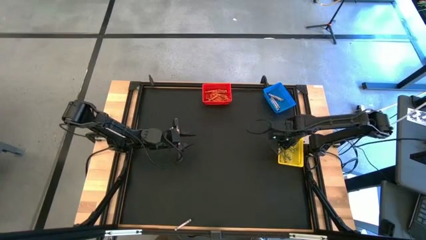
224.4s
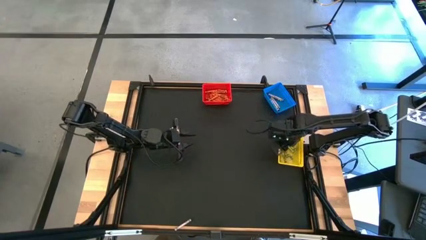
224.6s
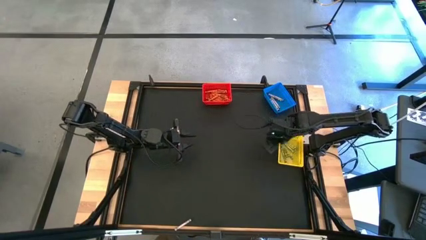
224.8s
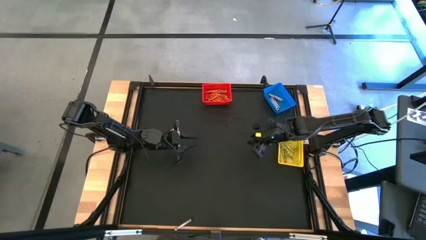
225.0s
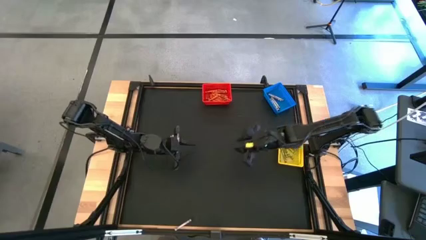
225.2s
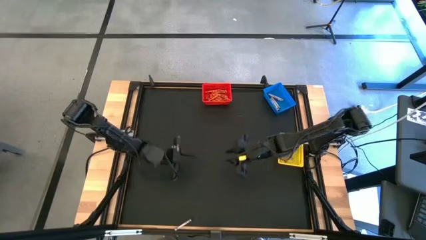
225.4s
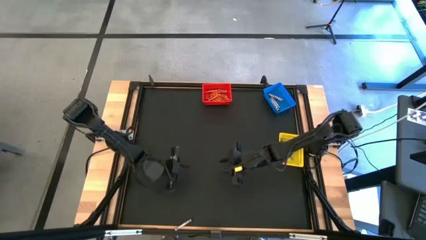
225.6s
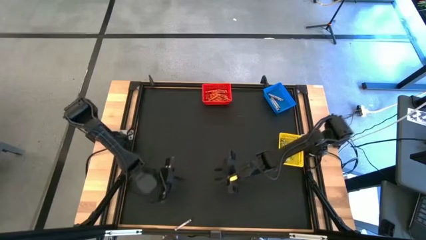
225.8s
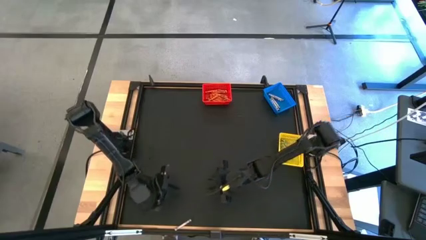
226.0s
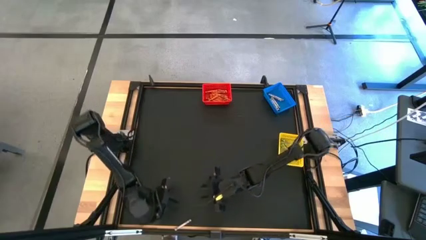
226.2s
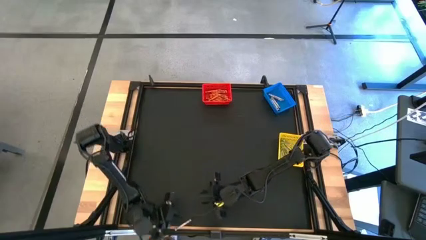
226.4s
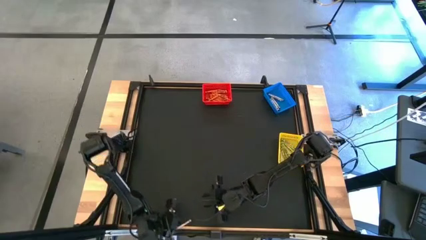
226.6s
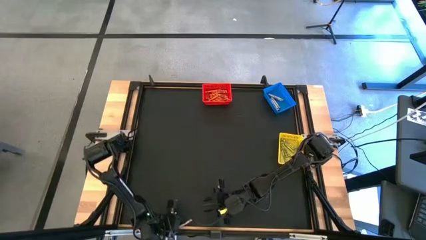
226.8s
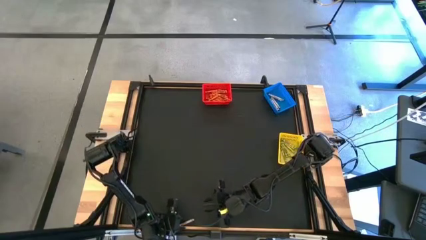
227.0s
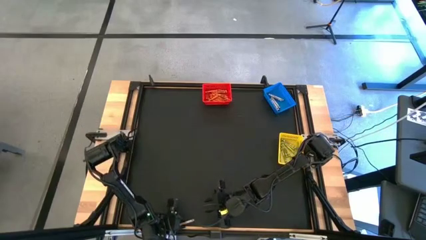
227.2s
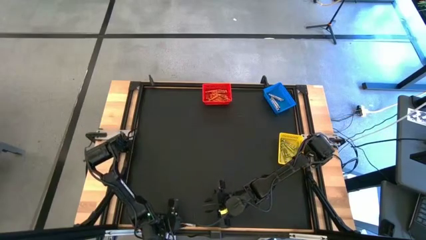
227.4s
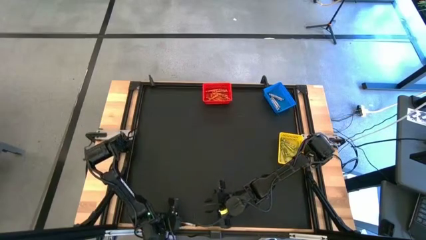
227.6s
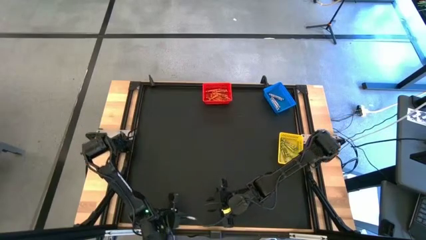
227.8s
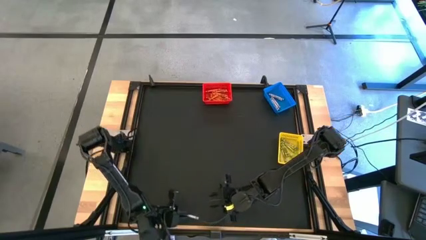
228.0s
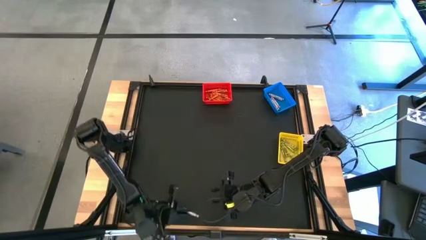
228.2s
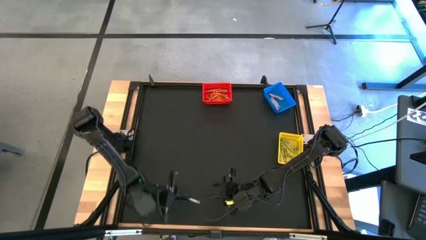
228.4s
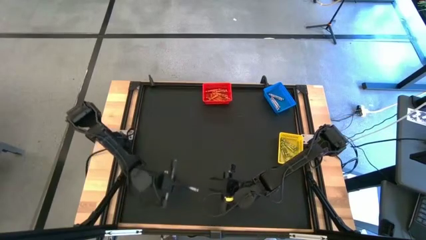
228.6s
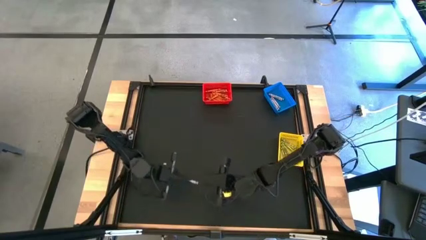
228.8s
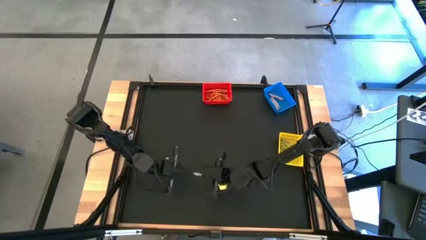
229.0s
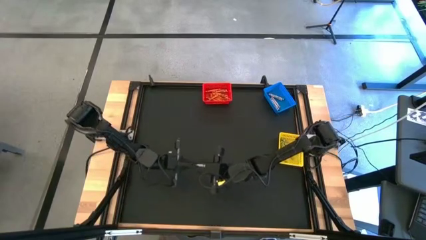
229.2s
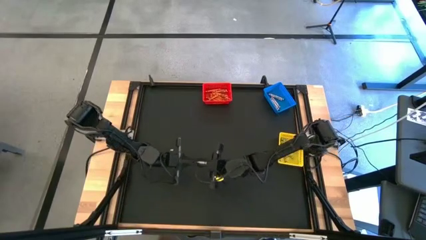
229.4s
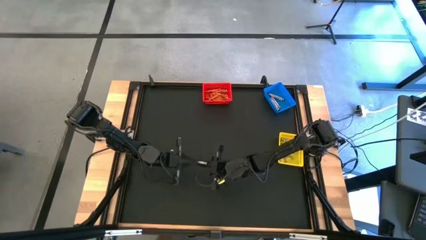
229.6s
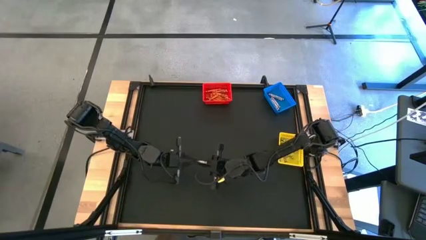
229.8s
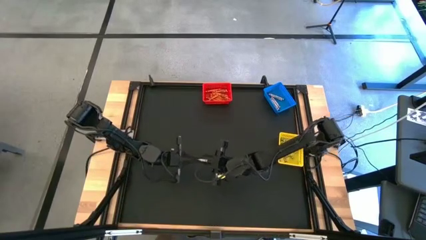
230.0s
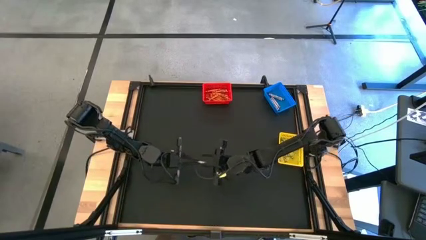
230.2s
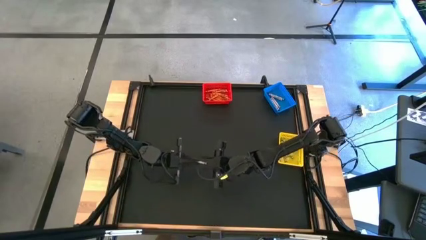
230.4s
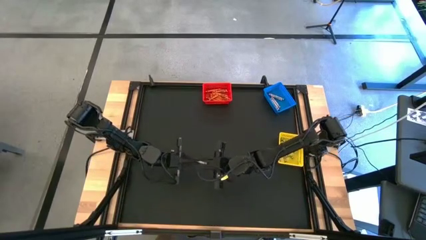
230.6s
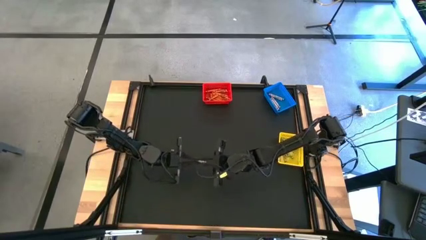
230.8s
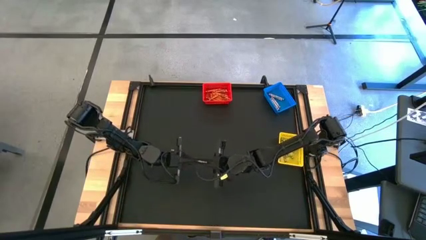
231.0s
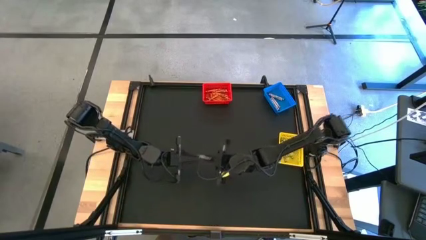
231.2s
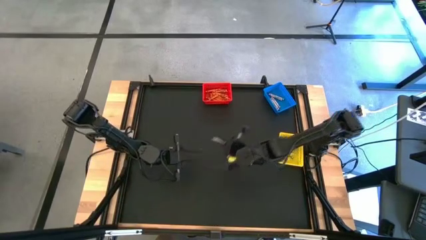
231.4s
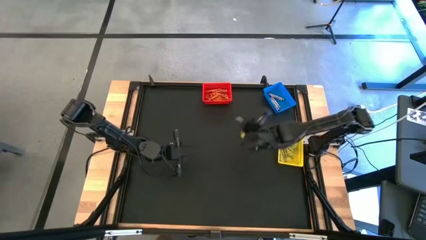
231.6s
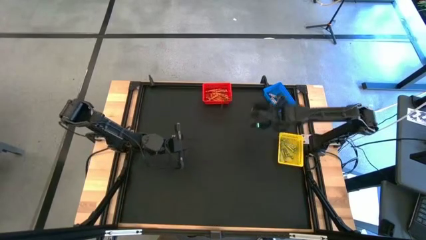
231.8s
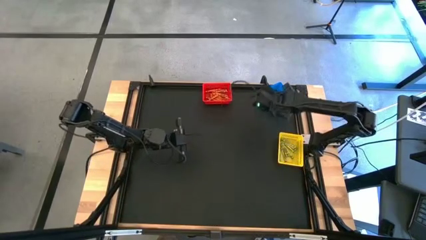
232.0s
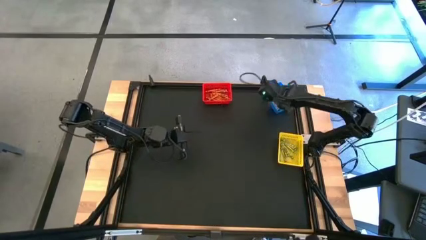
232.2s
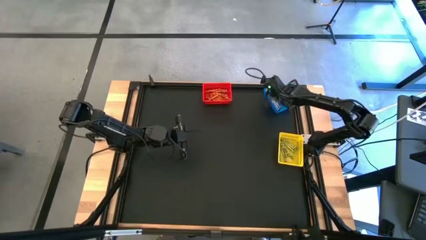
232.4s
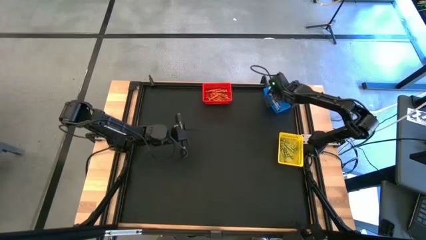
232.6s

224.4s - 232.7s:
Task: Sort crayons
Put the black crayon into the blue bin

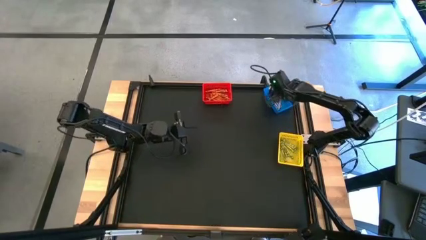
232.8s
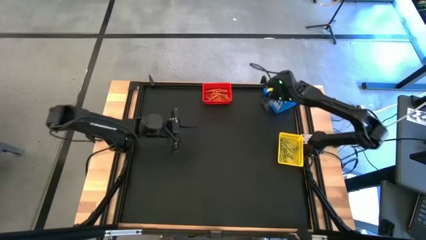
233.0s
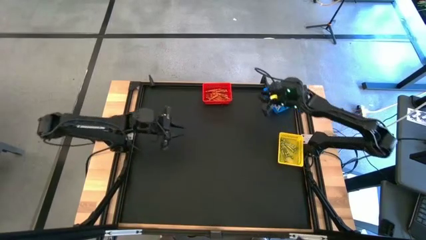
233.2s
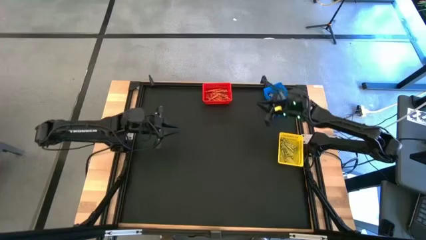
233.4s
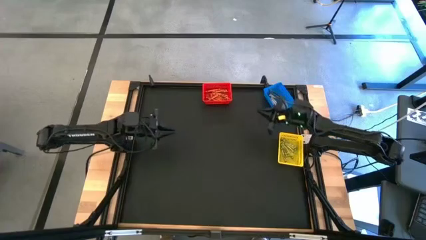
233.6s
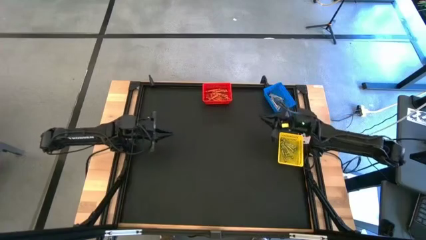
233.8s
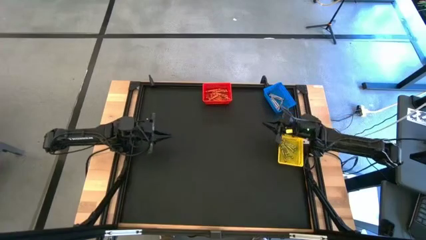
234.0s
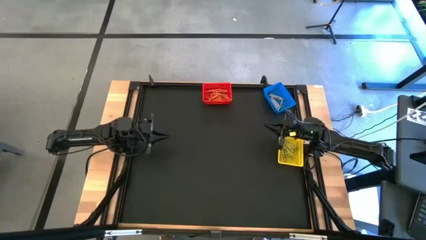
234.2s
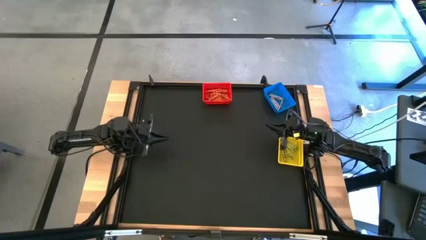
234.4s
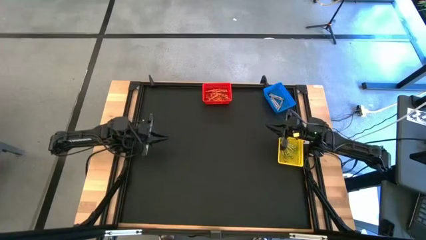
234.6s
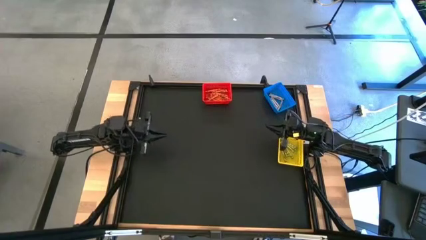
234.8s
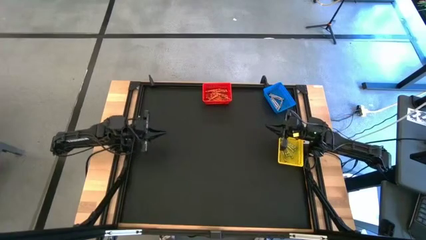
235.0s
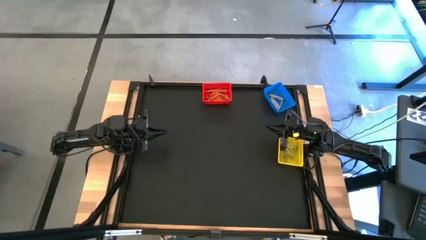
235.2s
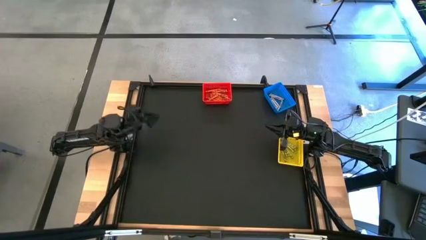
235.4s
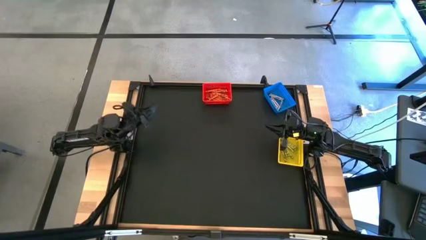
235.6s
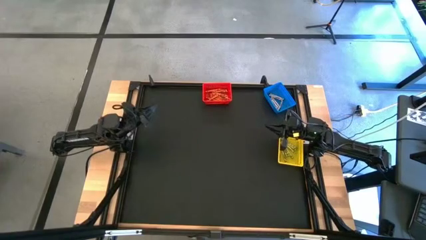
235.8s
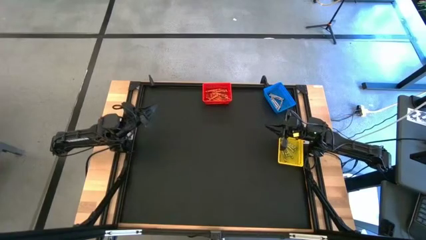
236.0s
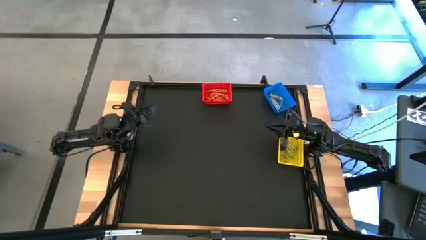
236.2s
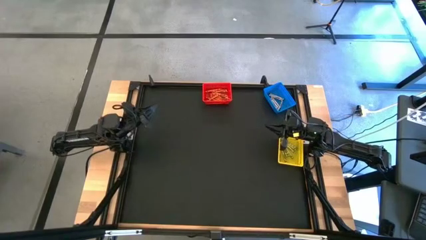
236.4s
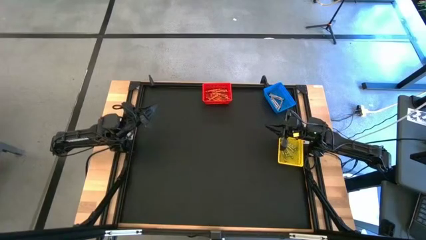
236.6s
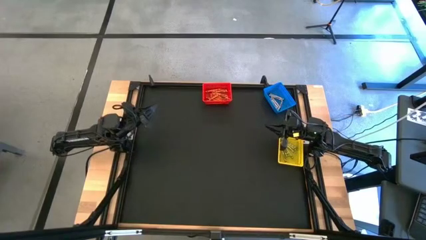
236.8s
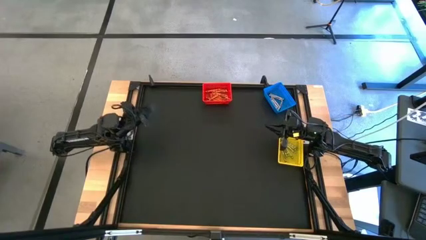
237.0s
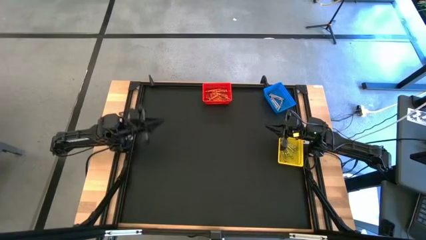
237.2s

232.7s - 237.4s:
Return to Home Position

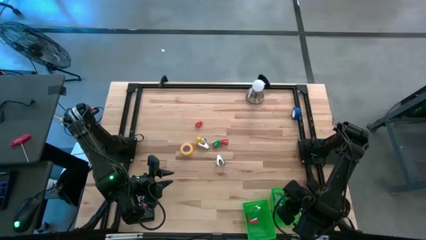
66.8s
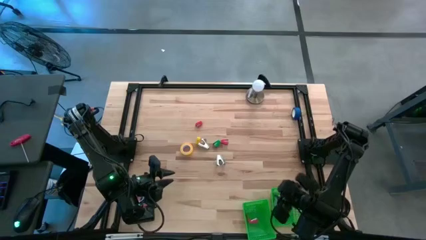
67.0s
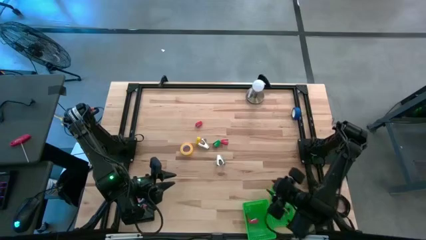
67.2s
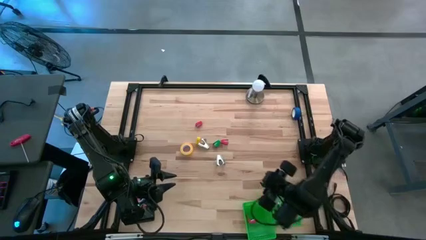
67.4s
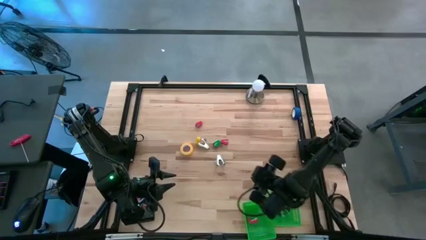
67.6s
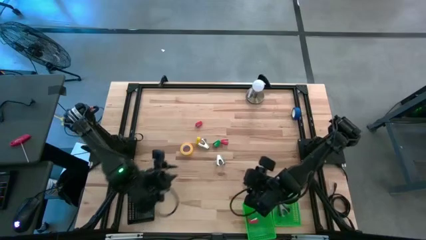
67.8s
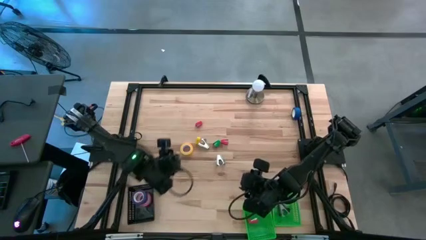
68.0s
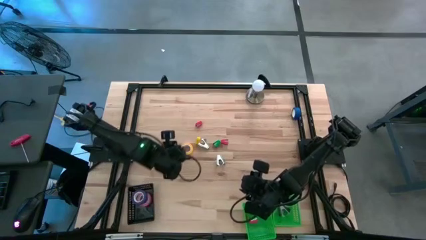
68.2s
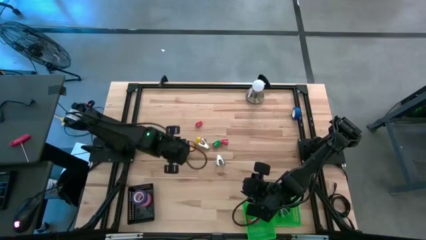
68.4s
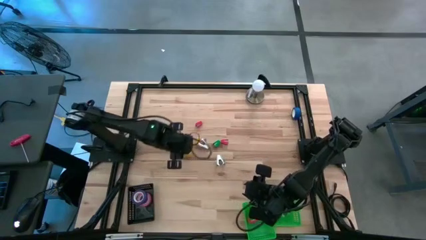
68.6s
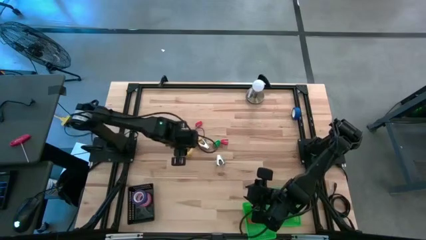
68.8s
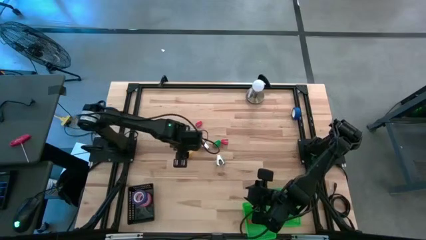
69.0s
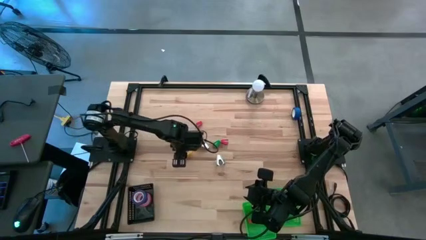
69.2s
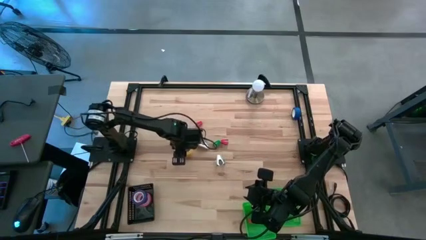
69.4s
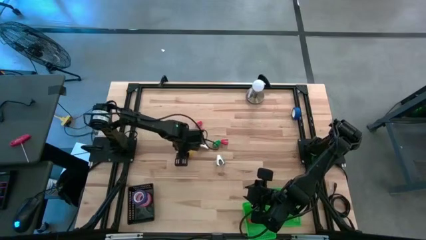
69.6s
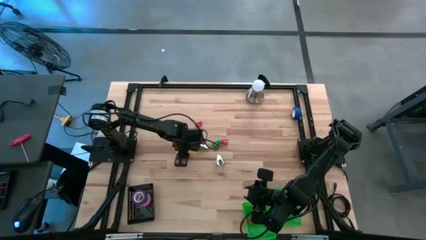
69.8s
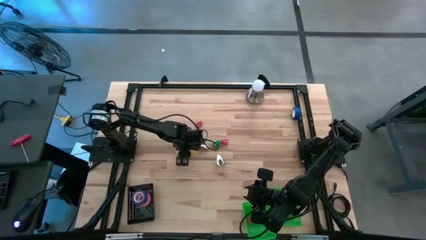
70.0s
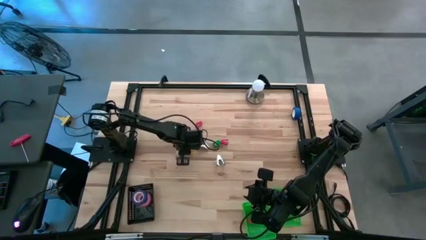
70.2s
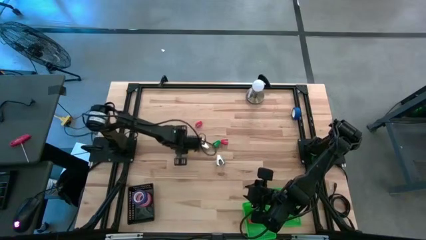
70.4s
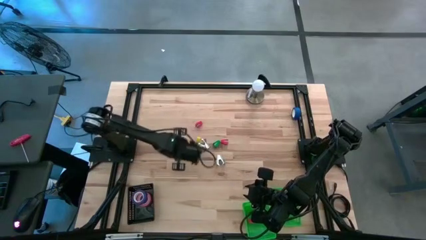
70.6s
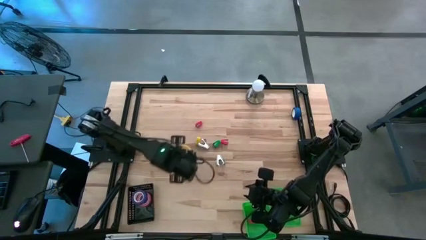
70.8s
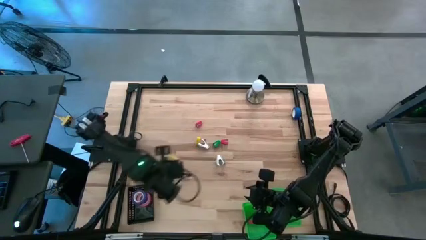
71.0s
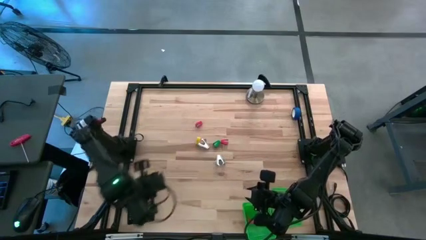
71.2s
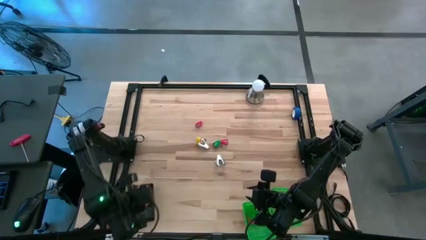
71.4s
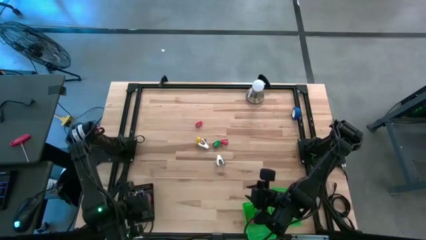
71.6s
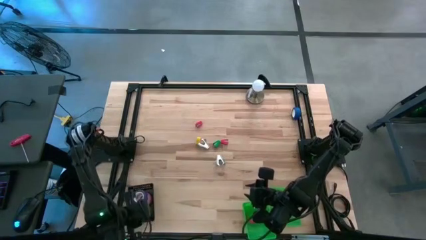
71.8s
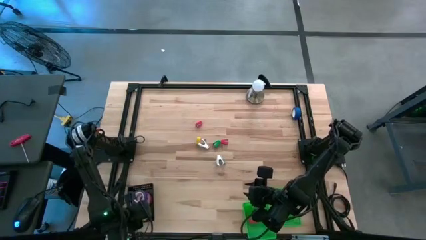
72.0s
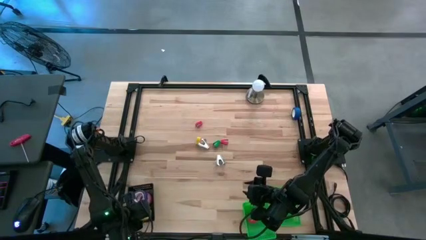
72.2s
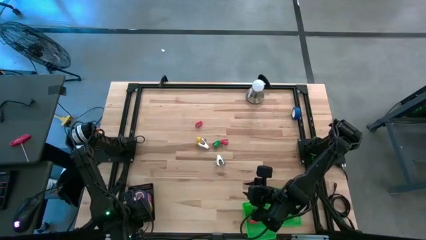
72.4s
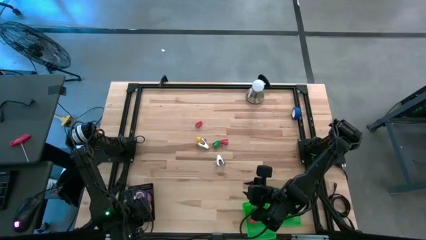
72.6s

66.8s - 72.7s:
Task: Pick and place Stapler, Stapler remover, tape
Put the yellow tape into the black bin
